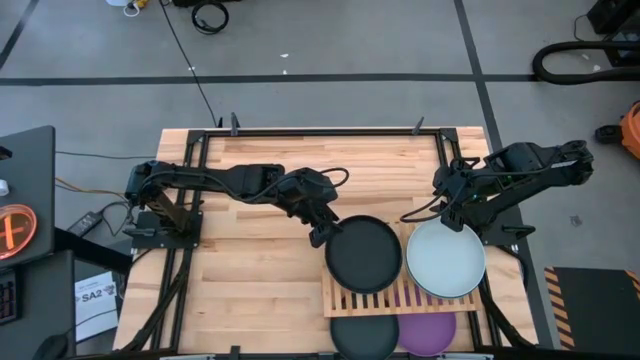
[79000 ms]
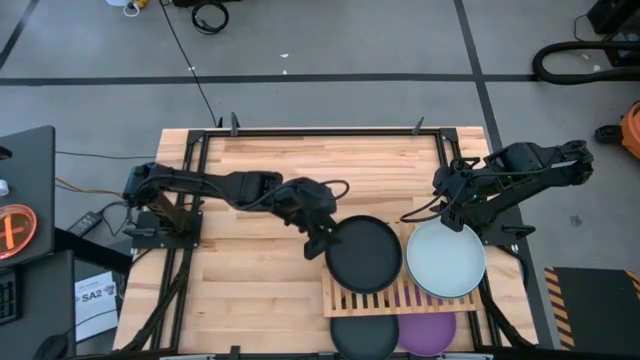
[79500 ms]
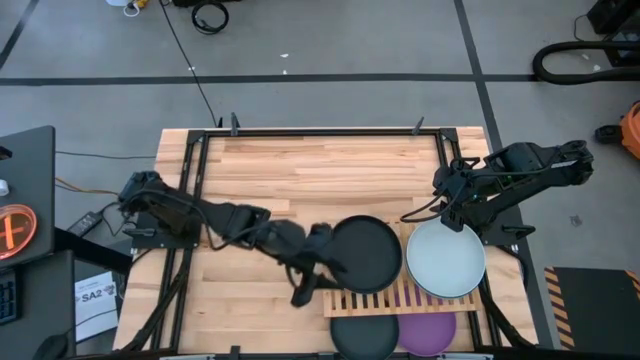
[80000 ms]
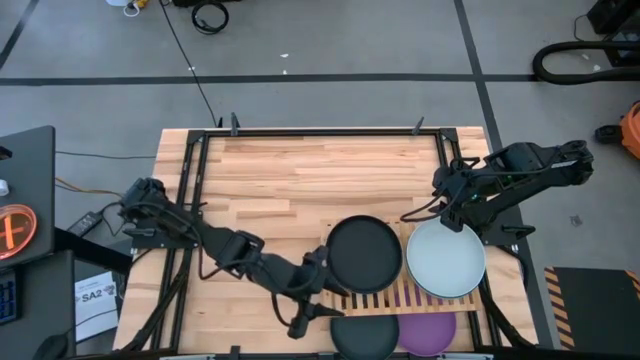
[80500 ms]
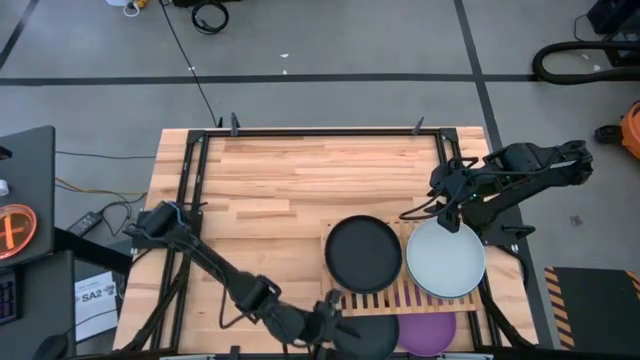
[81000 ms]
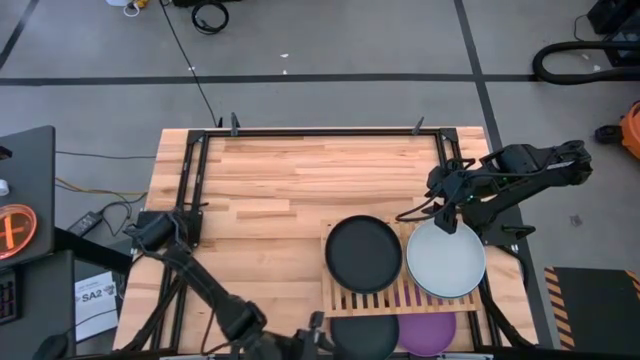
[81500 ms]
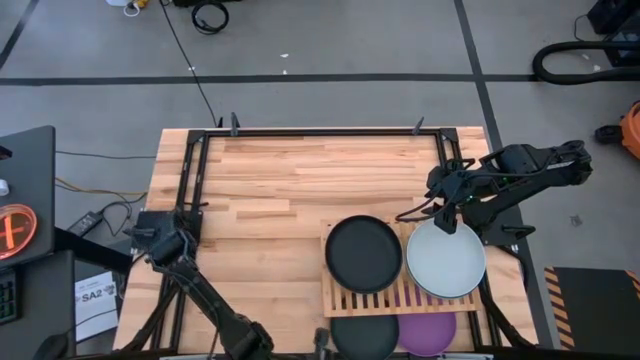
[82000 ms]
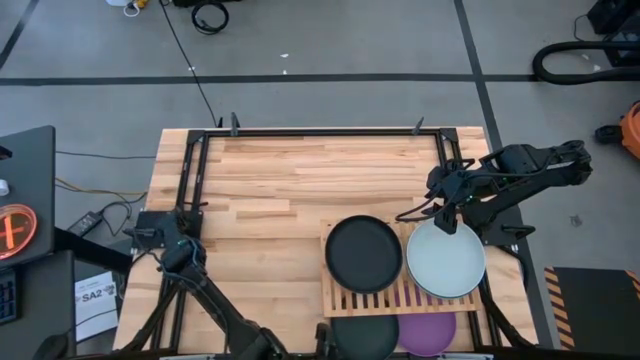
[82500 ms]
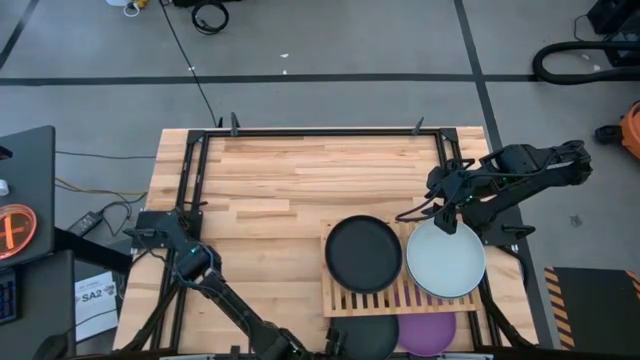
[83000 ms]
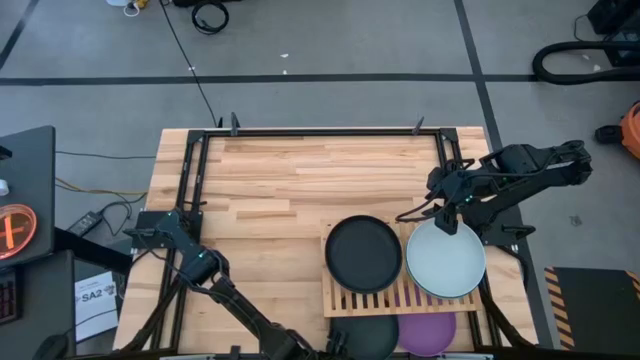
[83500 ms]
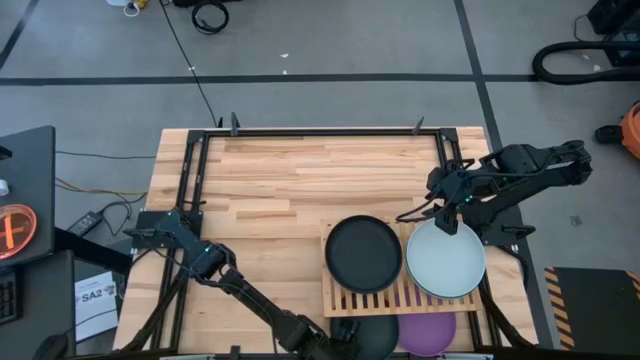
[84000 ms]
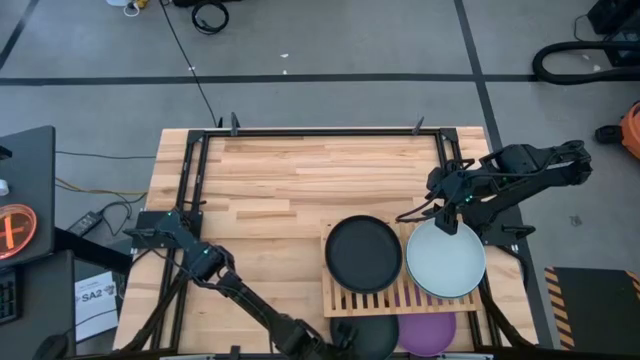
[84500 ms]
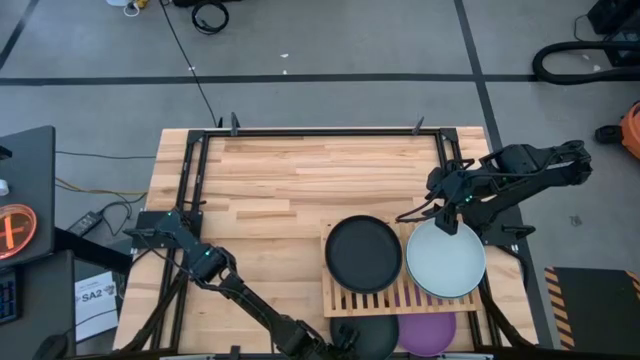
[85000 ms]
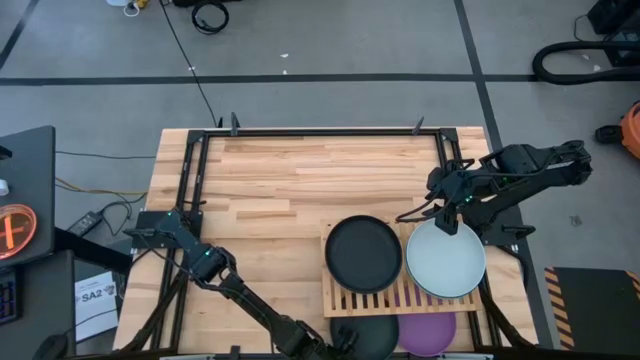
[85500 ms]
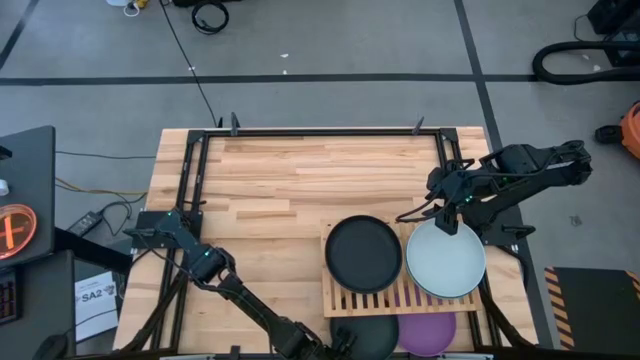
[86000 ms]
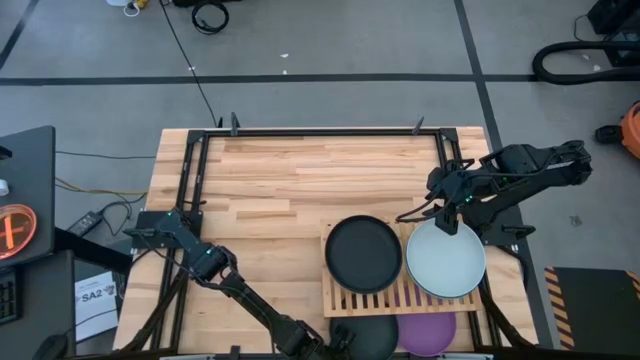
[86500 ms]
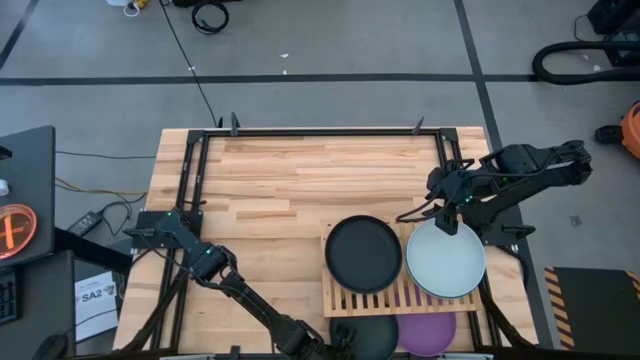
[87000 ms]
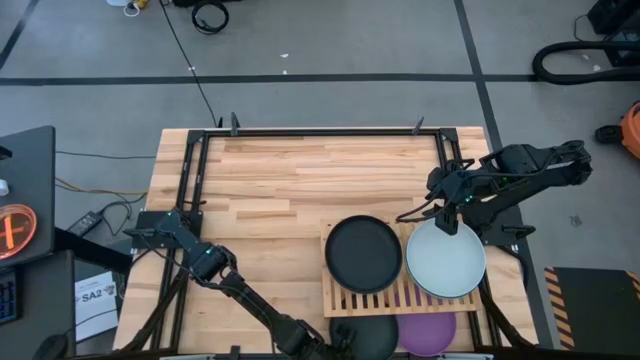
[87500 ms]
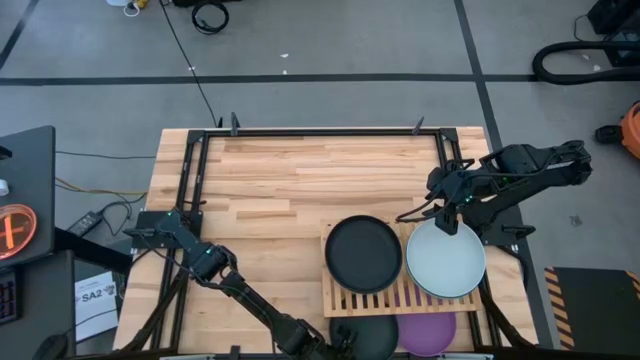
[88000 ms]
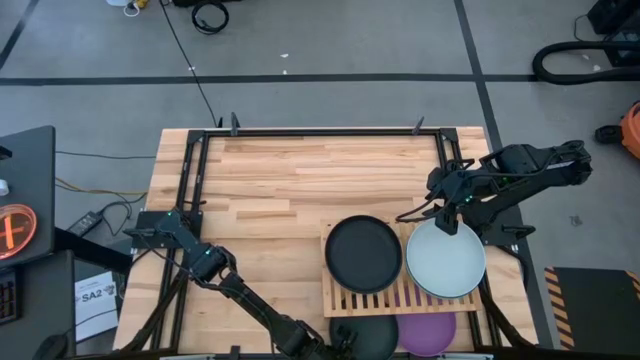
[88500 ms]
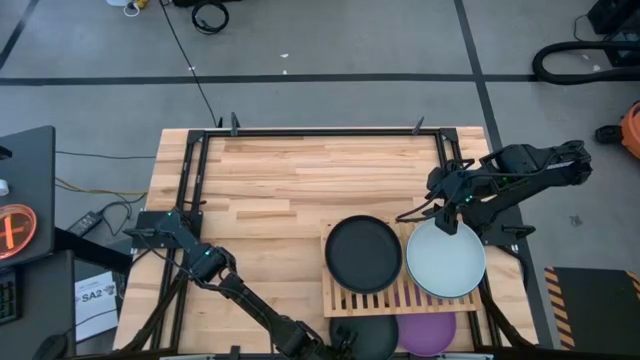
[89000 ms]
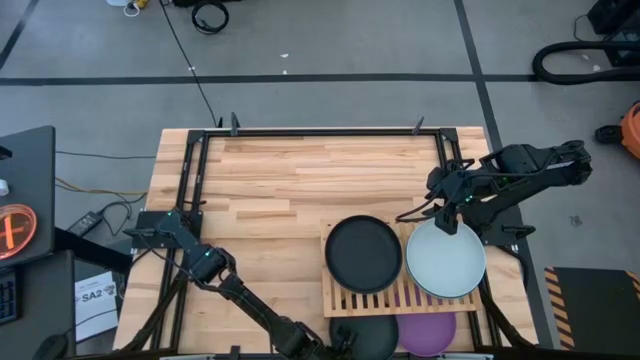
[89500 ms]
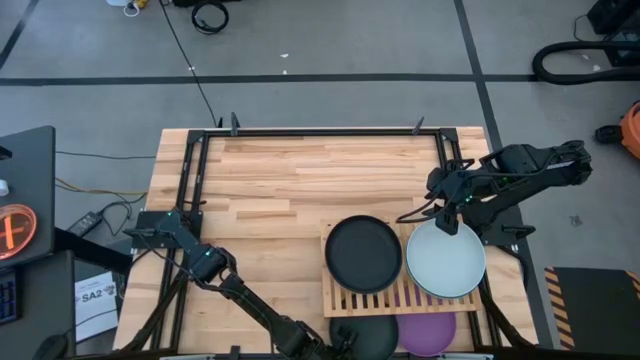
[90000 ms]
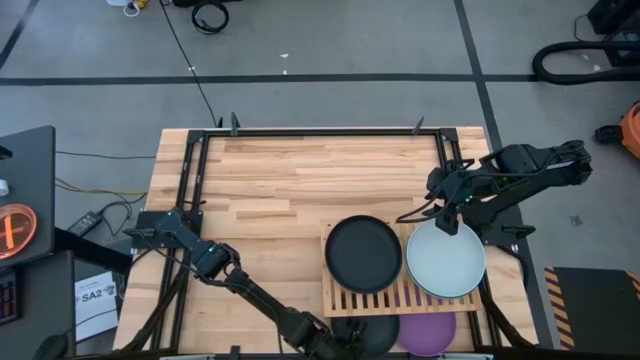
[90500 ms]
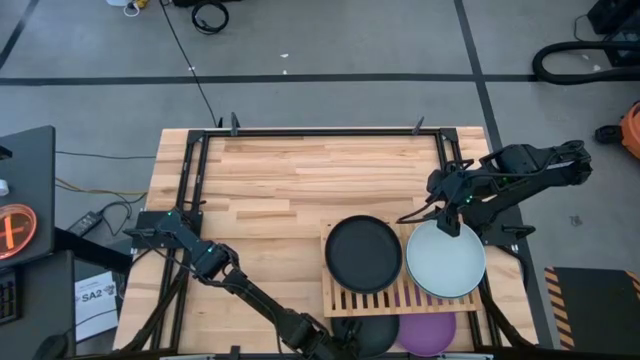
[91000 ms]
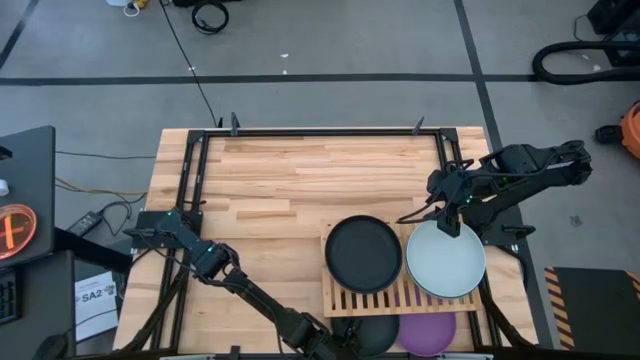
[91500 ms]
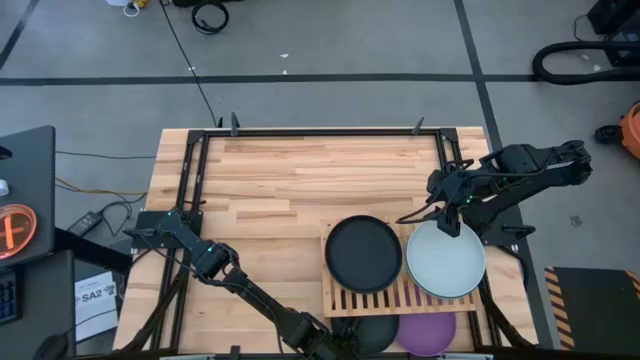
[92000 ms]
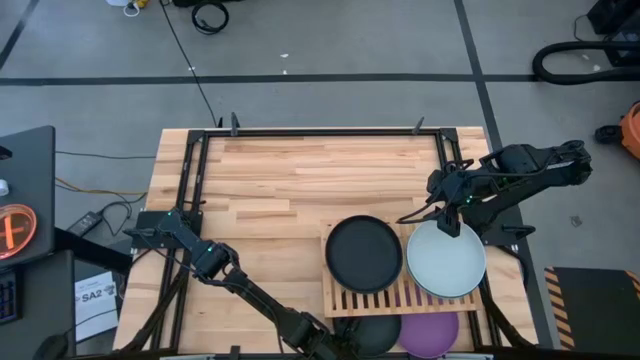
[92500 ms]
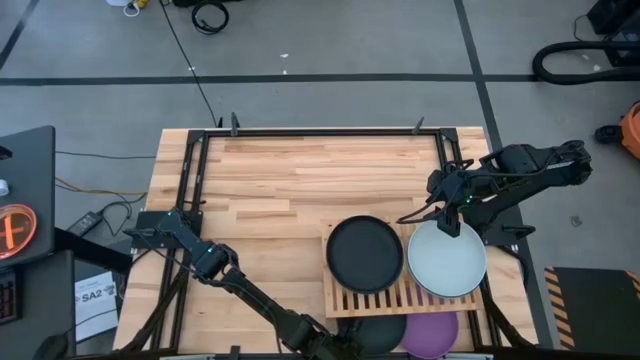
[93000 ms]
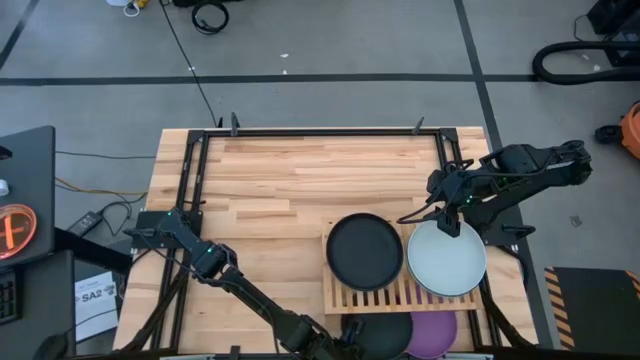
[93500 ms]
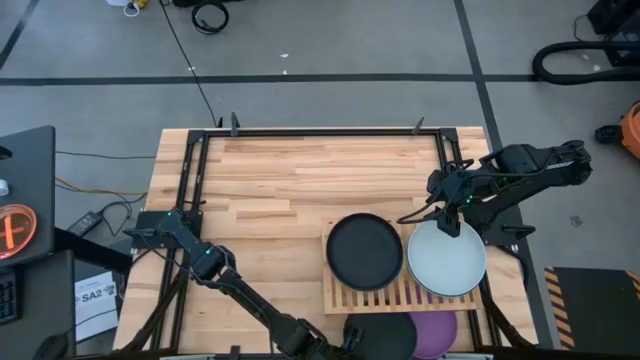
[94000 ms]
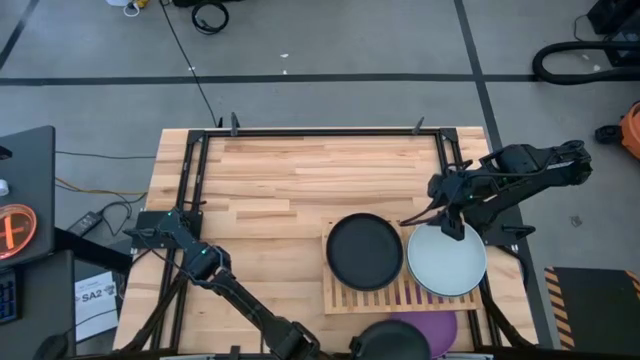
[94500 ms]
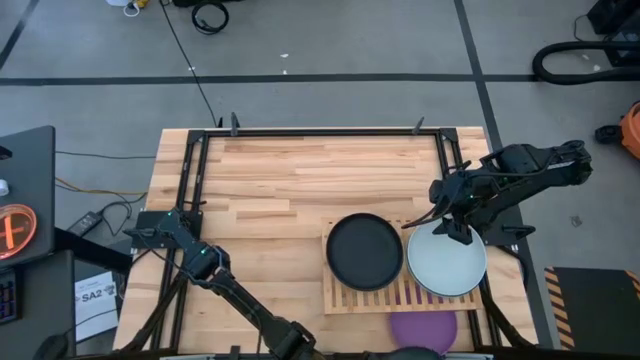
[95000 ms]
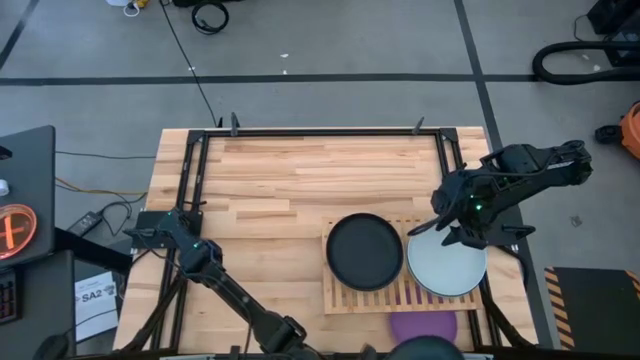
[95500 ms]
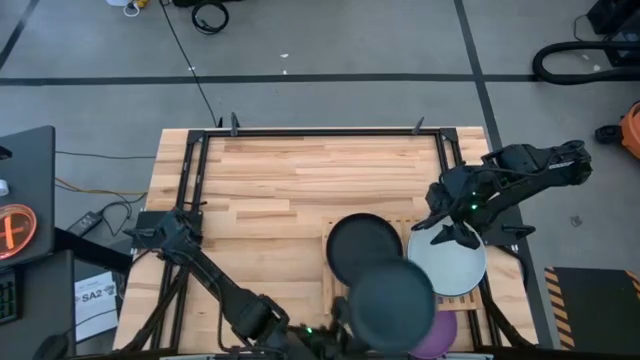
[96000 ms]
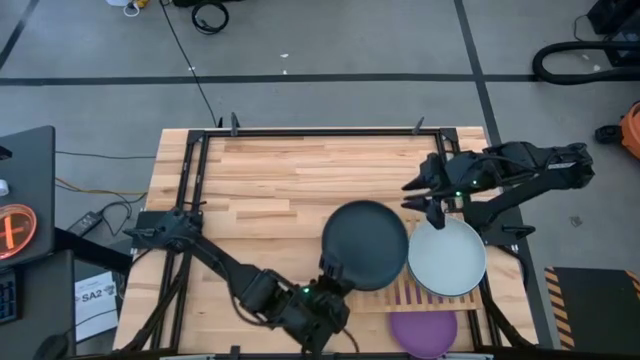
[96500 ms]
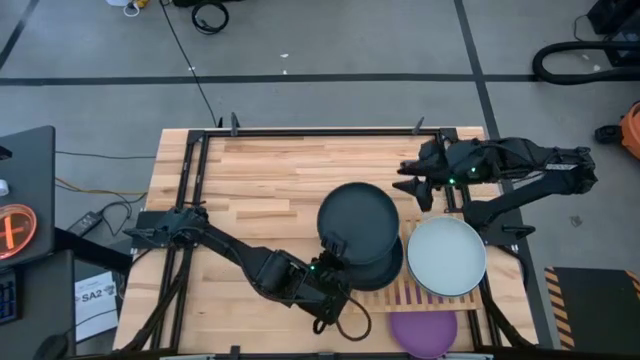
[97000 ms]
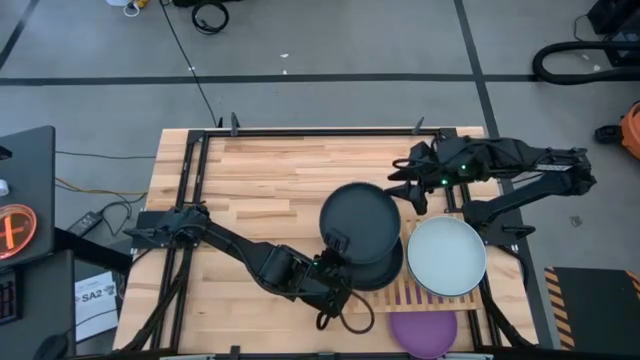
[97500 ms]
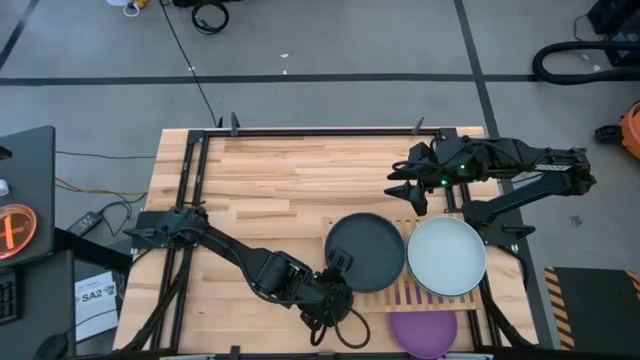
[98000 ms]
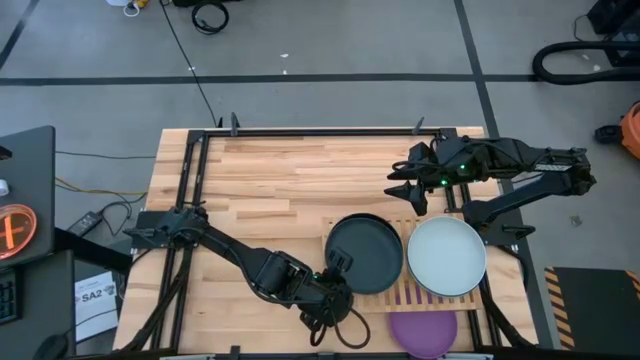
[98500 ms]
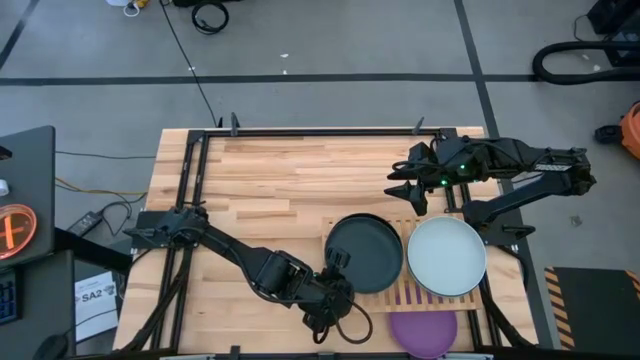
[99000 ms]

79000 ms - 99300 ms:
Task: Place and stack plates onto a shelf
Stack the black plate on top of the black plate
